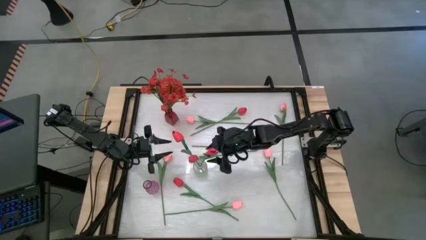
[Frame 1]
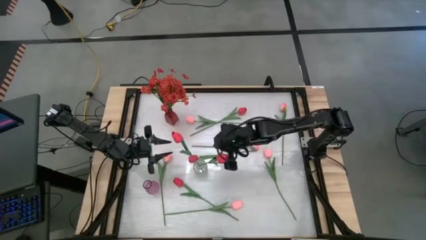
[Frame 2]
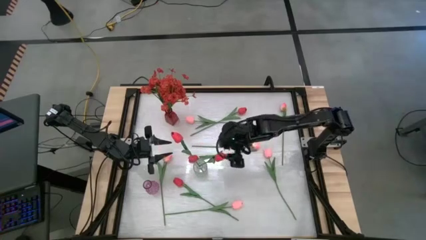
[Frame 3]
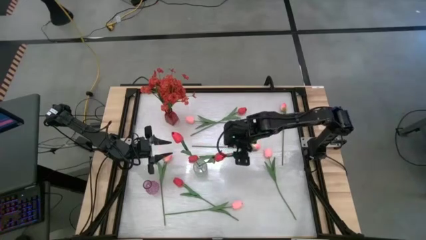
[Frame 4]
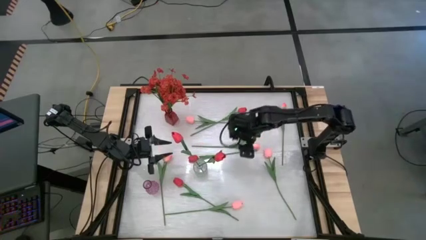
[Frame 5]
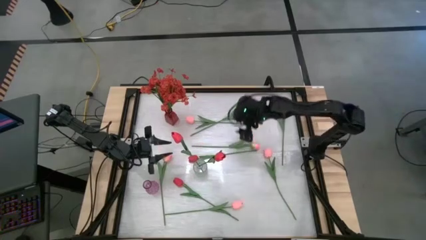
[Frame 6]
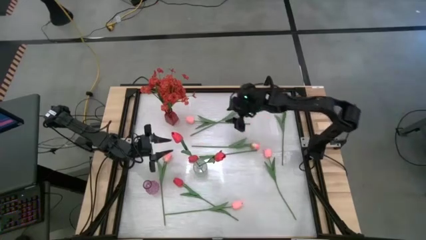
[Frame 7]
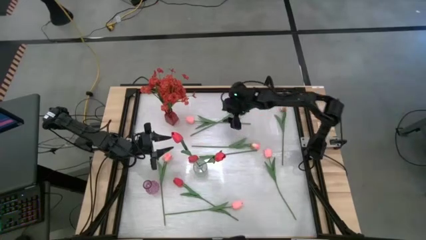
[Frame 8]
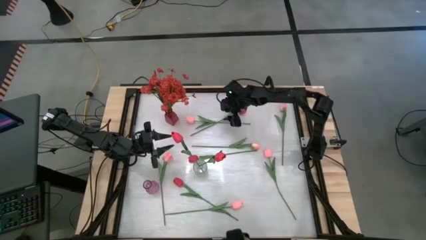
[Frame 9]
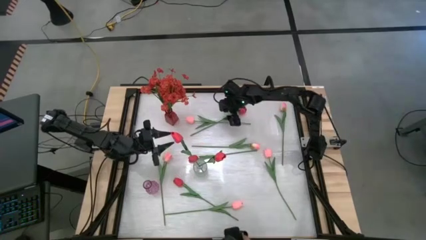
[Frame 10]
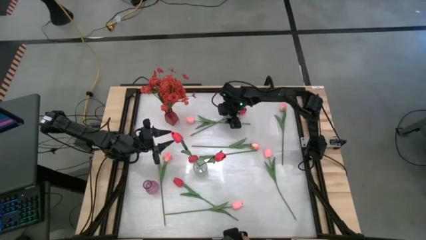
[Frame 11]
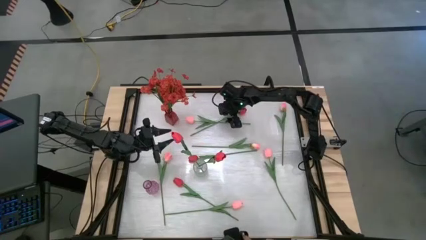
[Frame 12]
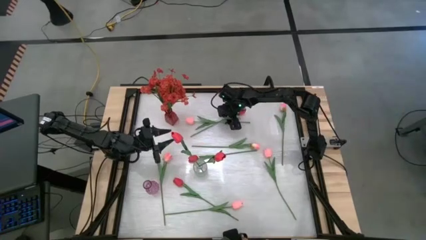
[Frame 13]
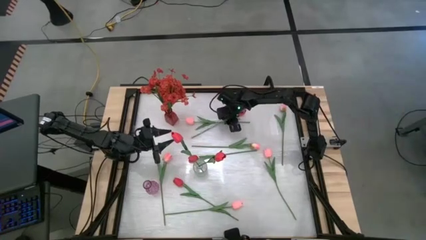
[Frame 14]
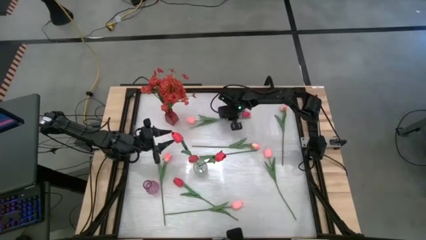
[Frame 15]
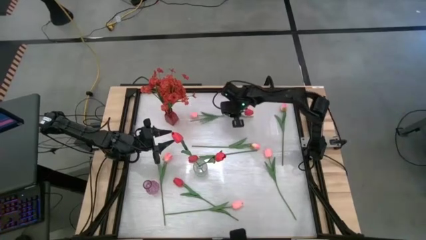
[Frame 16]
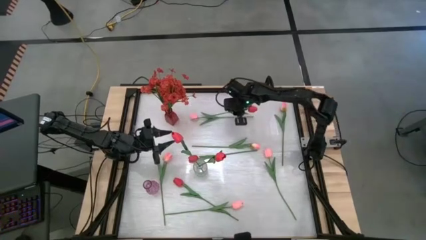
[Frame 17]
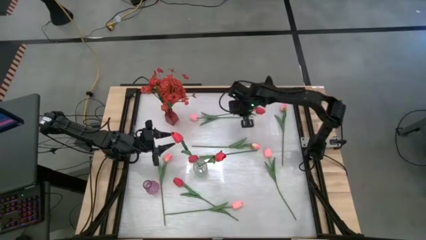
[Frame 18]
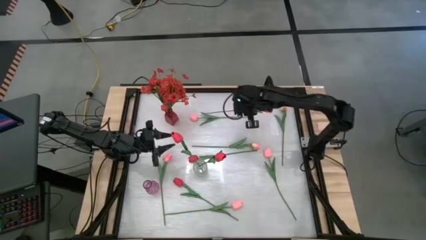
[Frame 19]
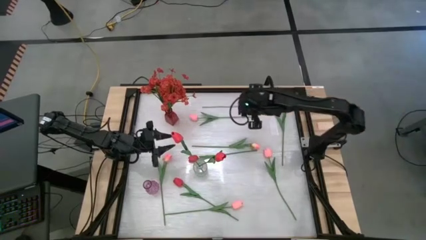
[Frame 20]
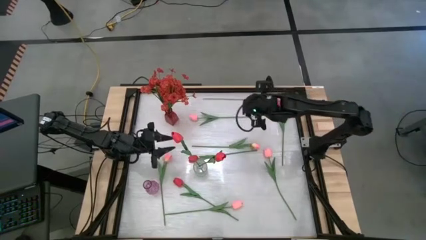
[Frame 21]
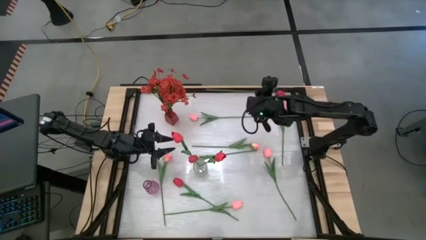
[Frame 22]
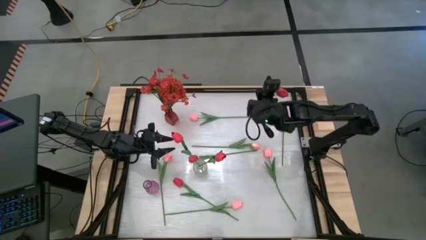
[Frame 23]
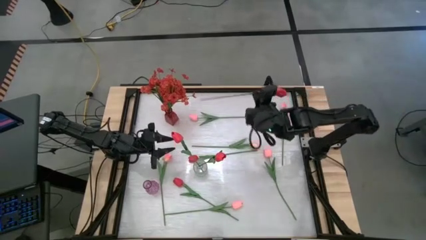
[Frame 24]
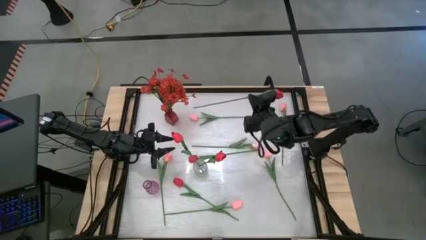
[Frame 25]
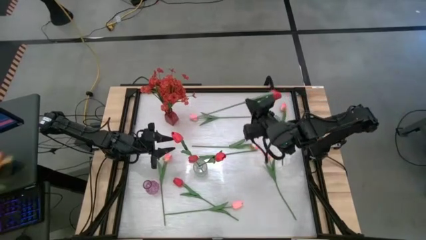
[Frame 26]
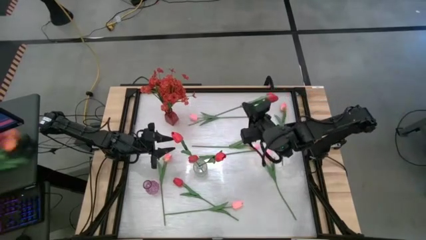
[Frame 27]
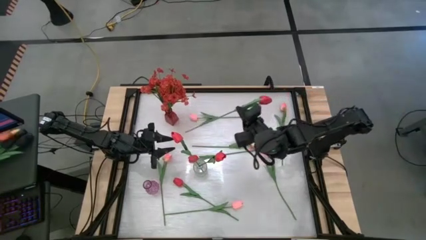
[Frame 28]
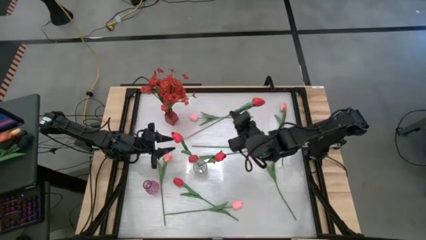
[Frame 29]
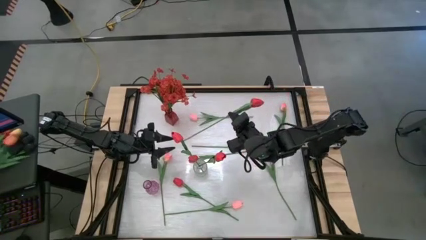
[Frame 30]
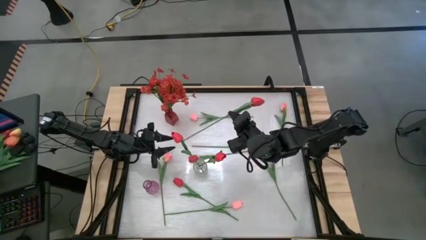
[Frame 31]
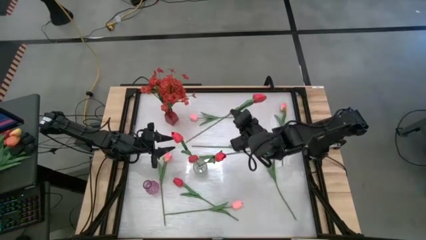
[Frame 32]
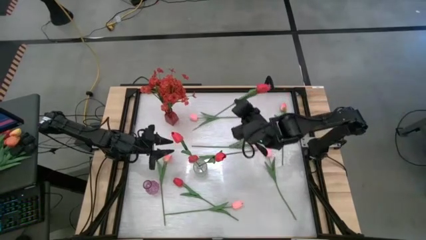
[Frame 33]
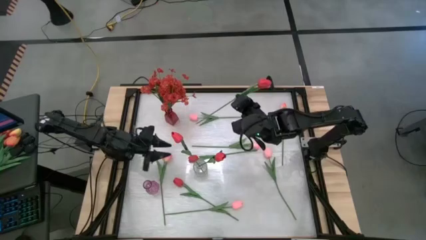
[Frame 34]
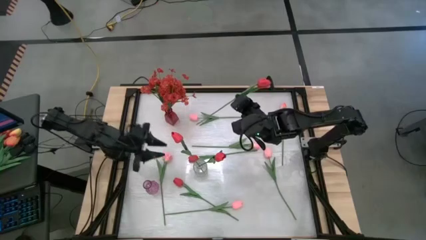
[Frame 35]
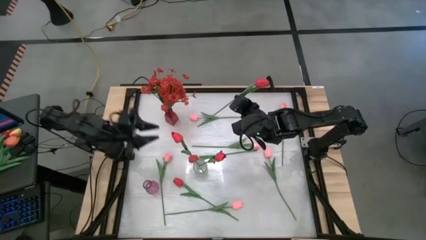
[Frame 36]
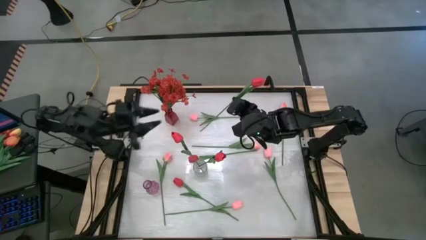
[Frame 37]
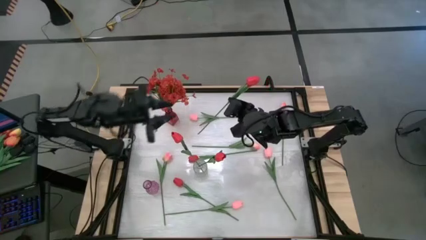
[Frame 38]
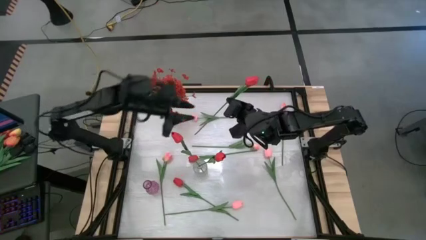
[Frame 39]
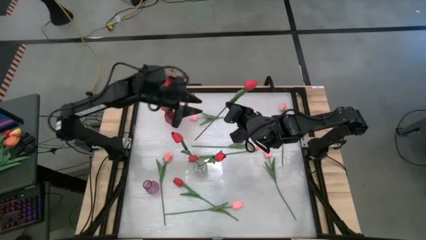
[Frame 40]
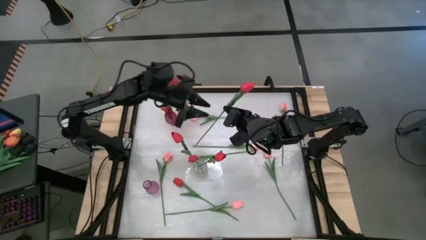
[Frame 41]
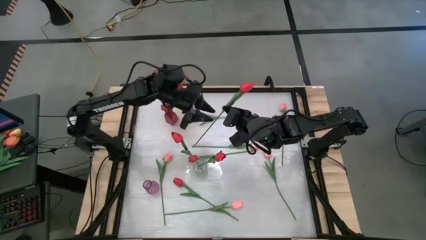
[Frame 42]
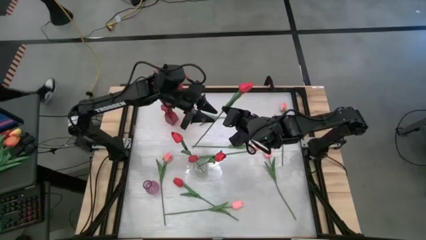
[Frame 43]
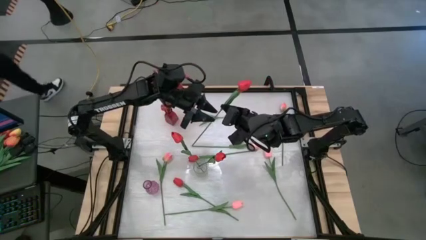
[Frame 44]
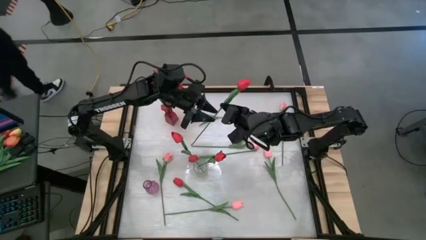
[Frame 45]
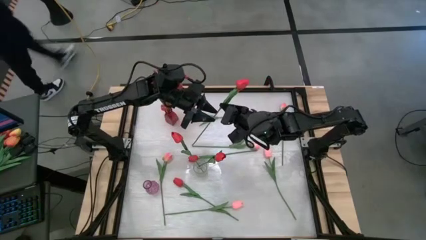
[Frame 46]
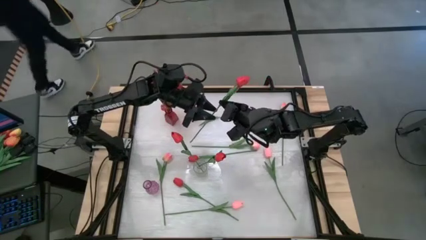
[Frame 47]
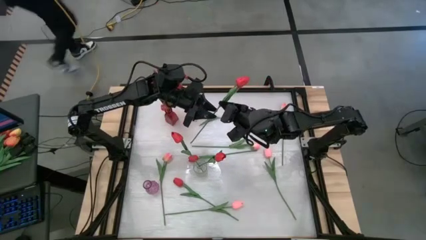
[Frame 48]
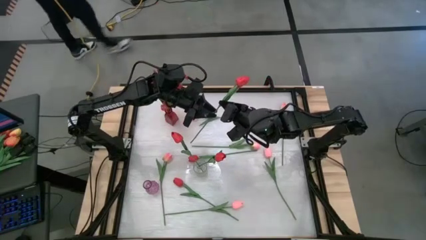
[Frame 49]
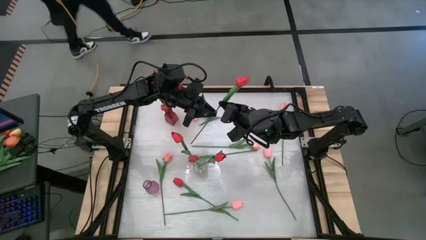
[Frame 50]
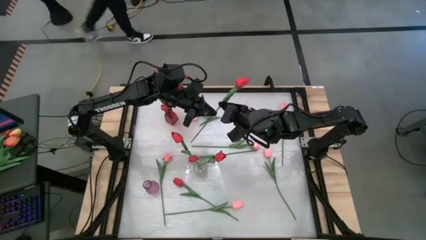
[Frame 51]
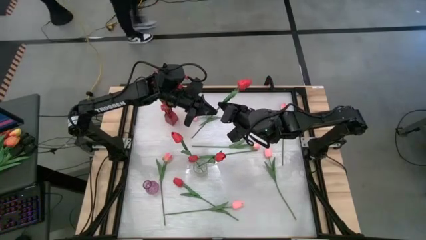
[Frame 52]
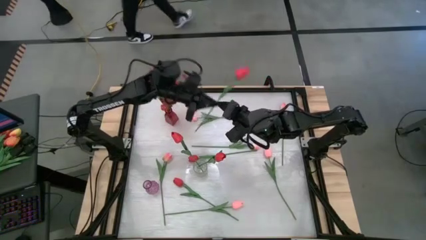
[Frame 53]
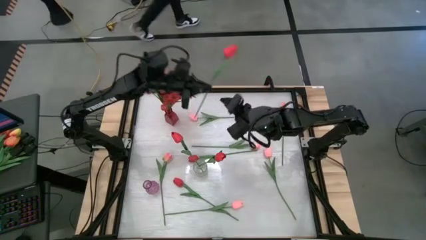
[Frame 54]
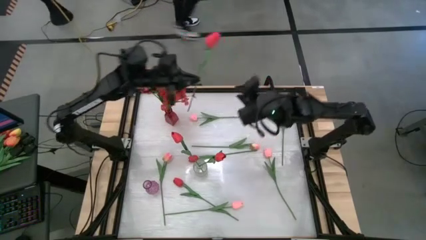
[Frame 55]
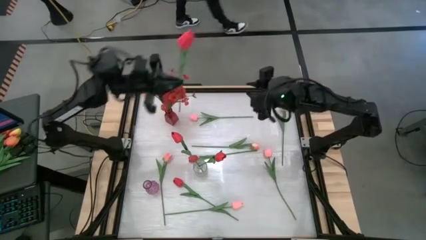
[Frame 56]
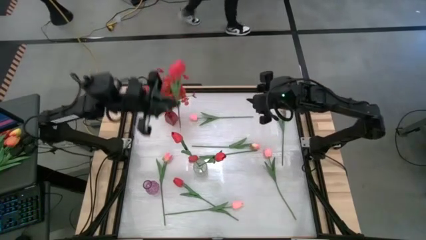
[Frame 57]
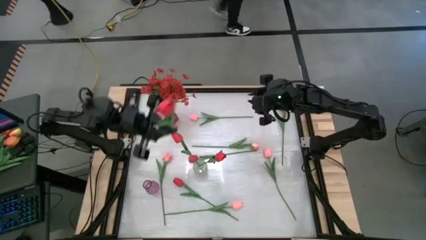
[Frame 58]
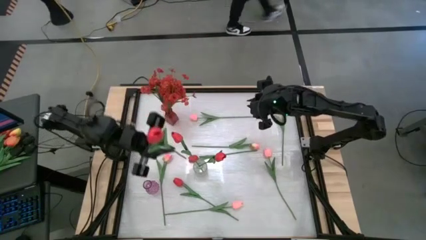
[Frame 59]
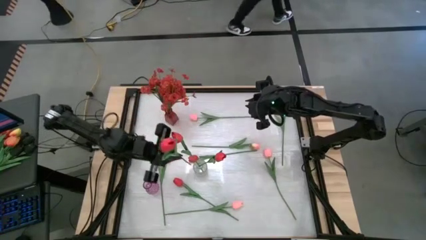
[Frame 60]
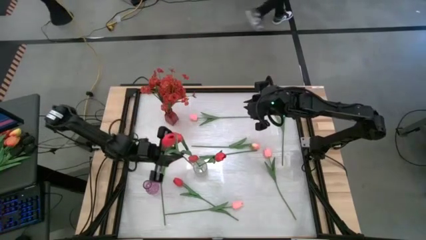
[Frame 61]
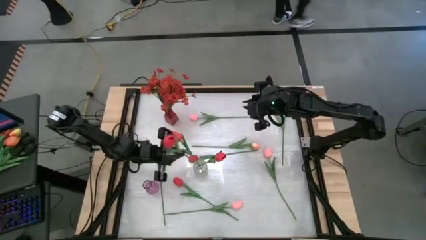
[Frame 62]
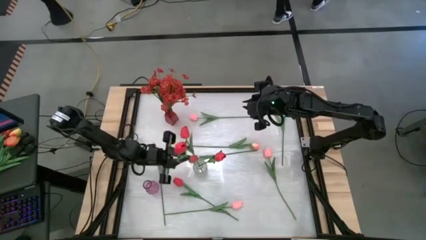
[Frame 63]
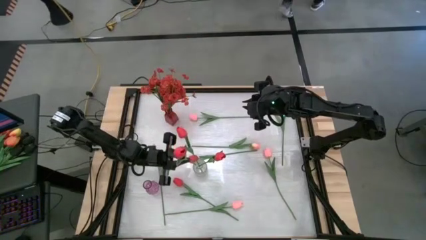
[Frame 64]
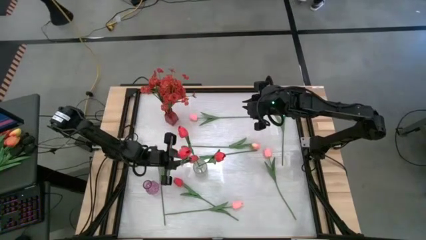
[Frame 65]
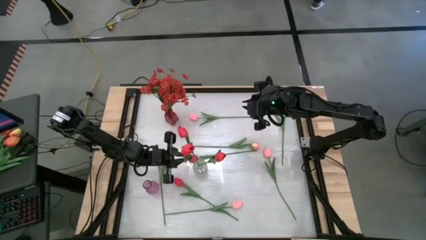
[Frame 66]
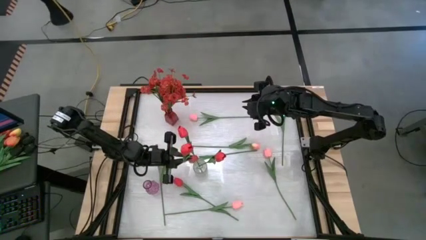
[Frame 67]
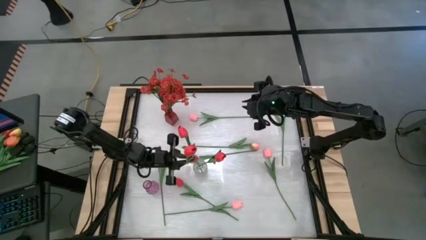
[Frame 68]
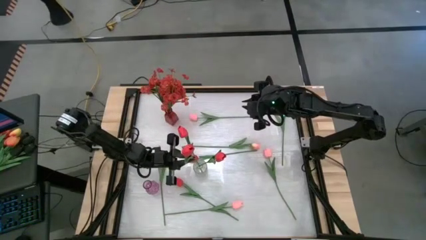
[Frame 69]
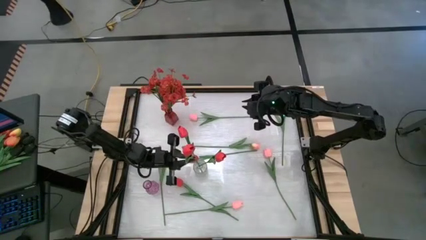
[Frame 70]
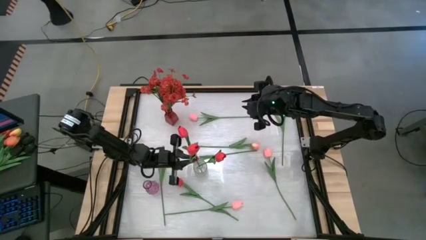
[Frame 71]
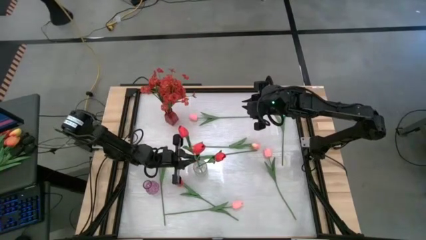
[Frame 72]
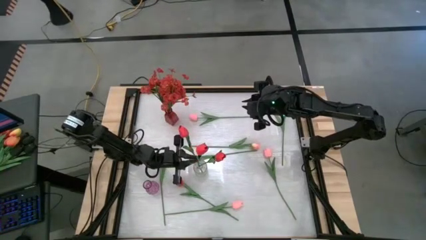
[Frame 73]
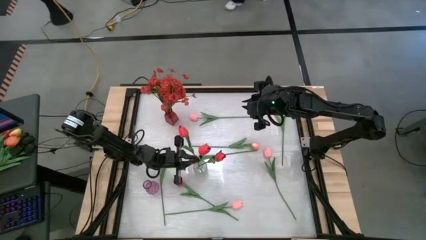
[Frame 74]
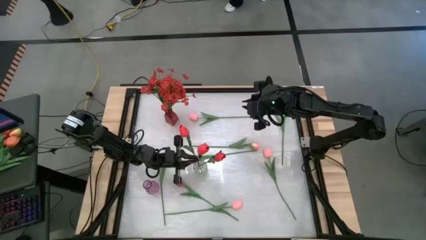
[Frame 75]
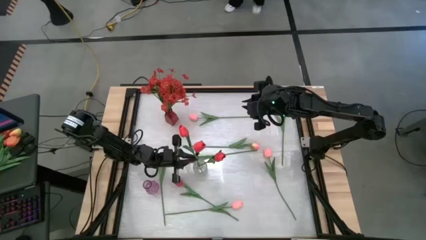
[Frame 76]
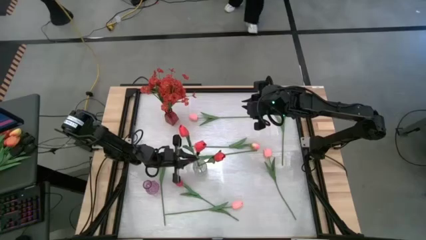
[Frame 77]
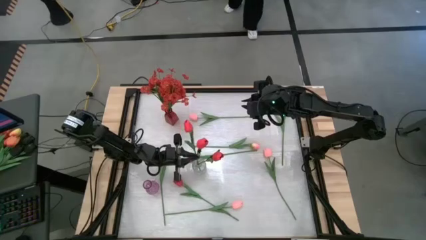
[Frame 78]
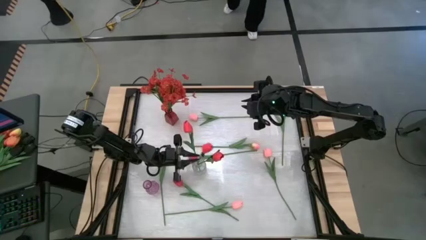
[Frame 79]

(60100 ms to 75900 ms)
Task: Sort flowers into vase by color
Put the red flower into the transparent vase
